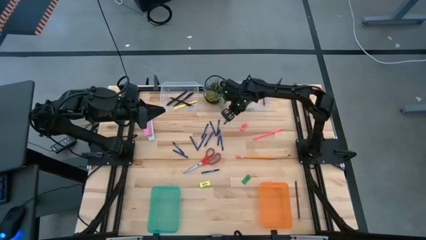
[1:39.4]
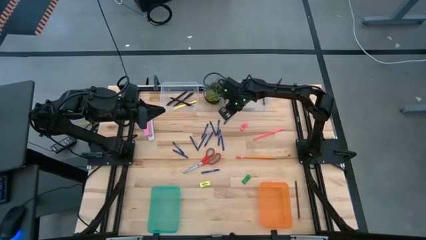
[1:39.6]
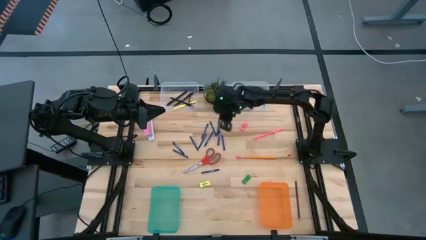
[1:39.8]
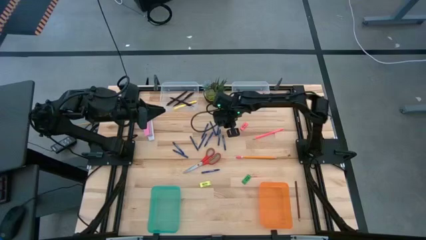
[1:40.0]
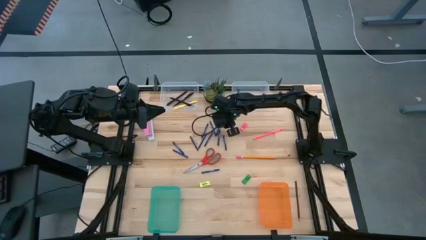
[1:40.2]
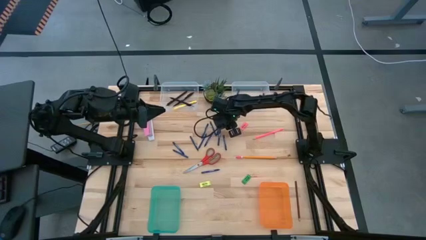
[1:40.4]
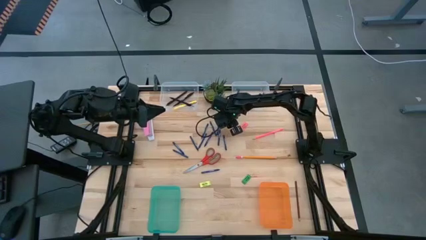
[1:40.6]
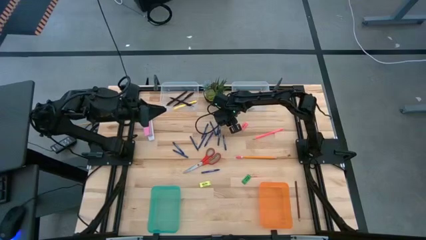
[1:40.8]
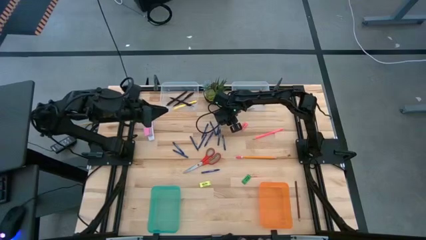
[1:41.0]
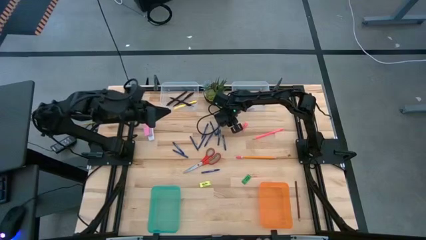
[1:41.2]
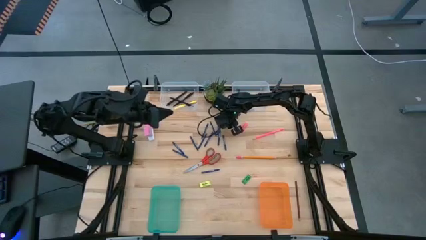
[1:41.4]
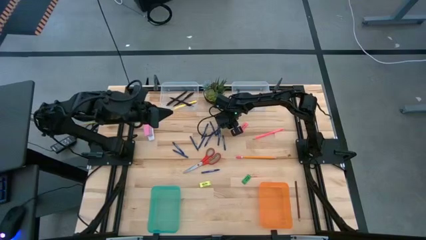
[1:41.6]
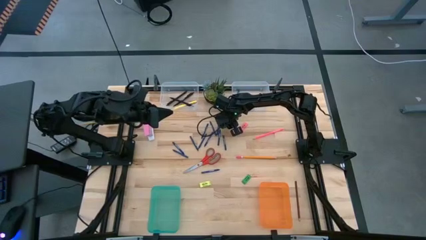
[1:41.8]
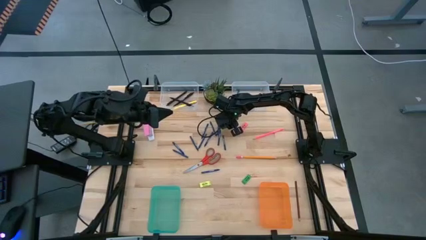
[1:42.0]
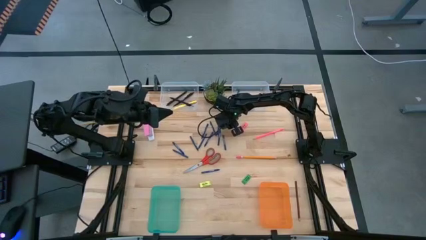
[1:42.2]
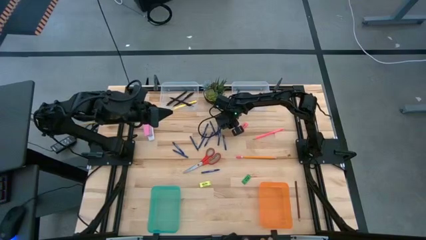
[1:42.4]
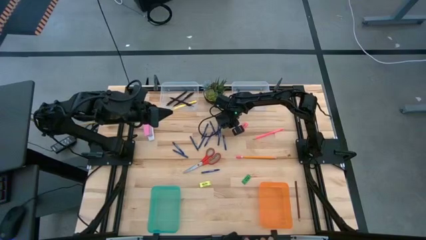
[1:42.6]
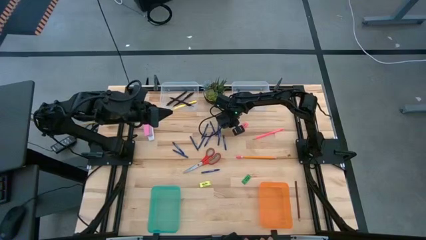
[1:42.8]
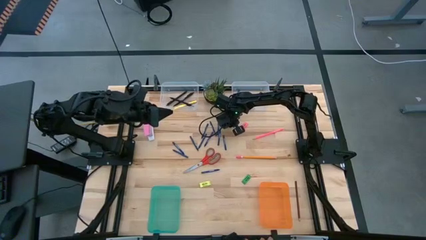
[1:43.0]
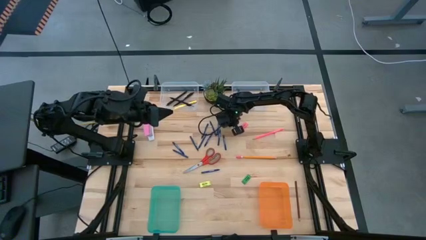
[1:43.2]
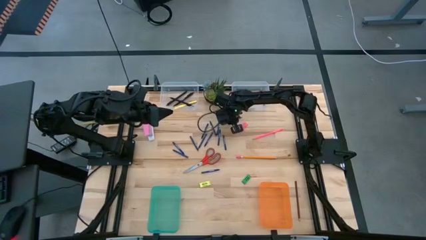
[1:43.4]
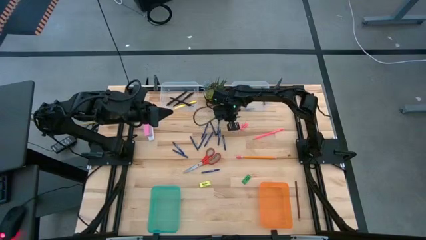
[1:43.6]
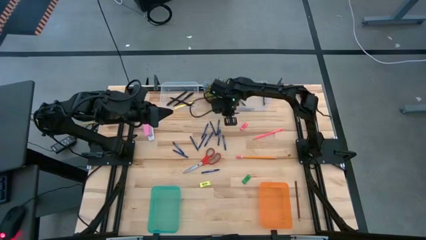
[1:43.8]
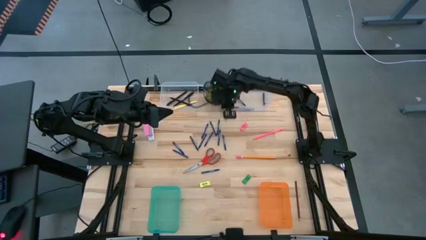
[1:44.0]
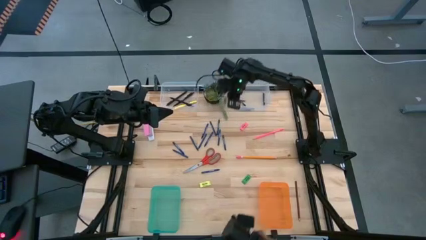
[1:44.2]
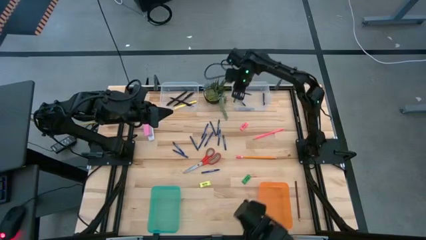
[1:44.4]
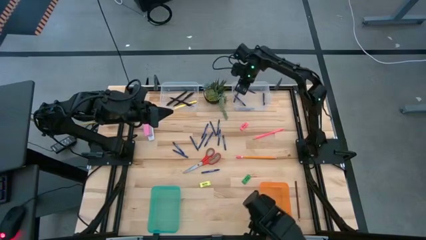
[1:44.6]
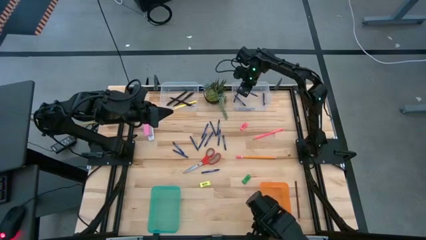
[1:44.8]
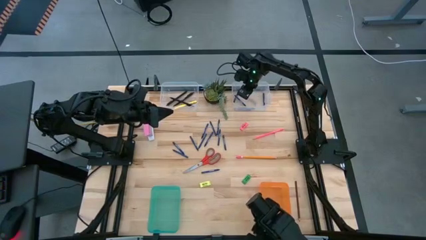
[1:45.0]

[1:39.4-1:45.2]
Task: Sort crayons/erasers/pens/pencils in bins
Put the blue crayon into the right transparent bin

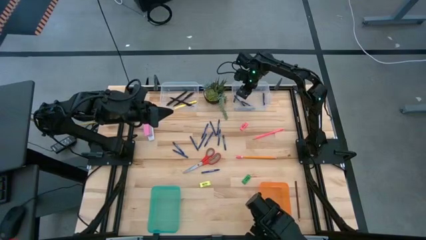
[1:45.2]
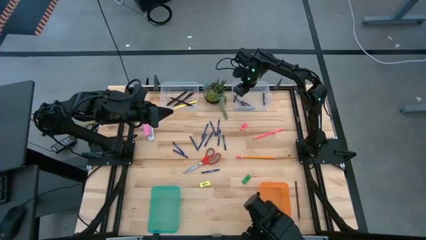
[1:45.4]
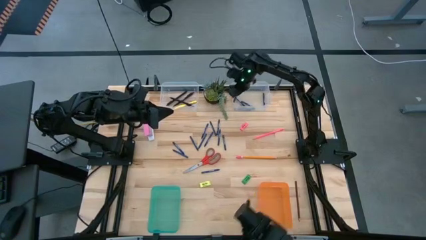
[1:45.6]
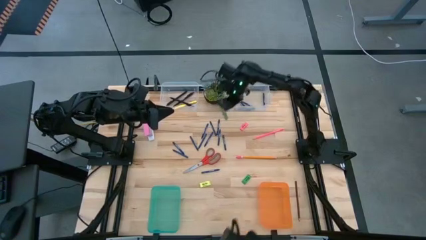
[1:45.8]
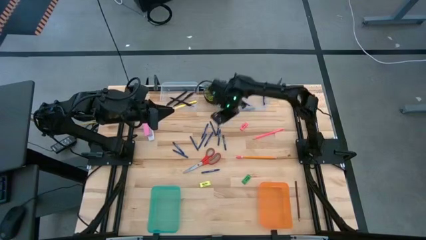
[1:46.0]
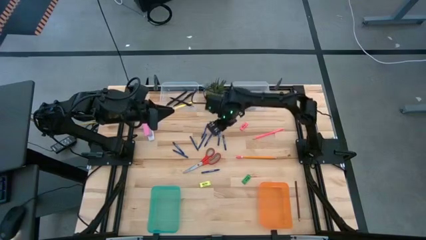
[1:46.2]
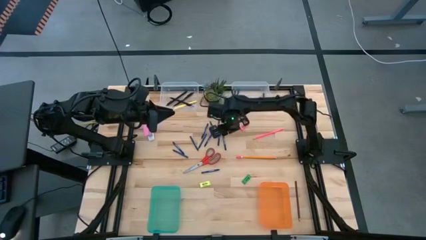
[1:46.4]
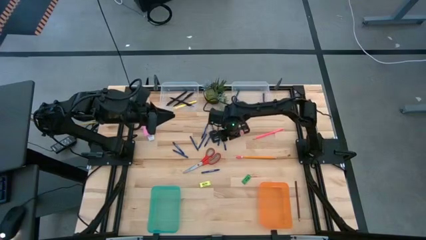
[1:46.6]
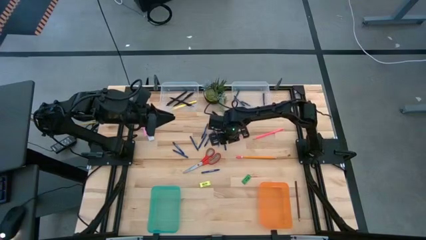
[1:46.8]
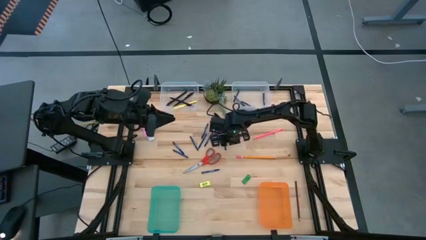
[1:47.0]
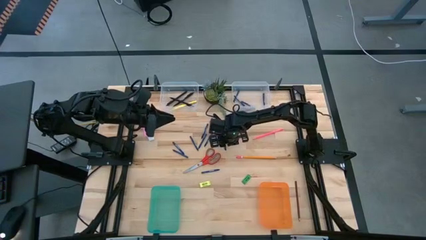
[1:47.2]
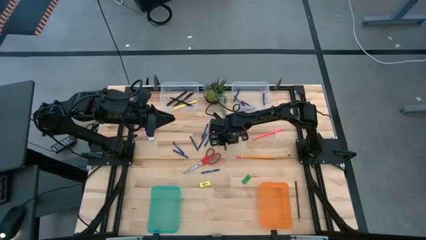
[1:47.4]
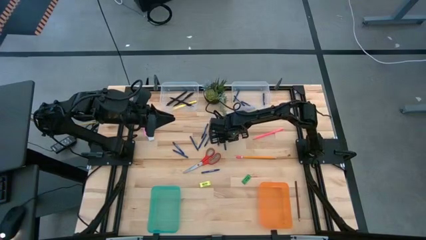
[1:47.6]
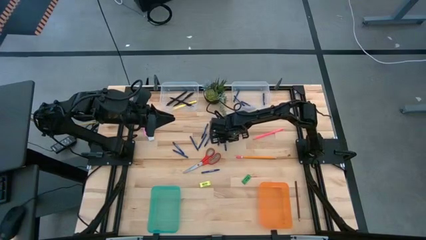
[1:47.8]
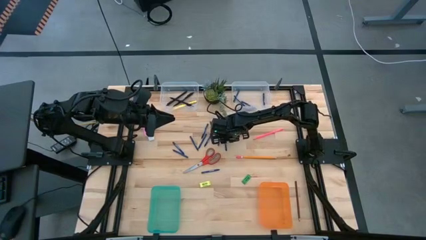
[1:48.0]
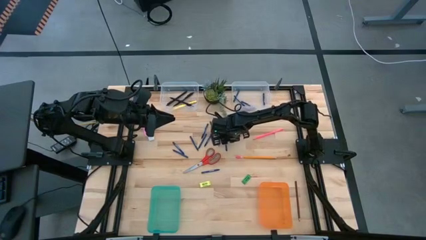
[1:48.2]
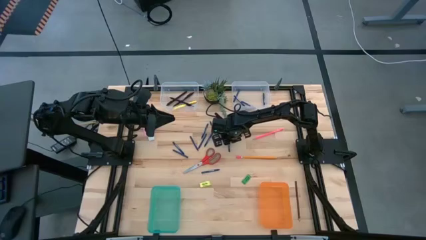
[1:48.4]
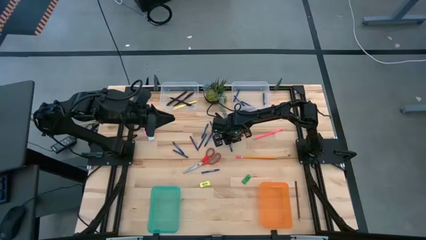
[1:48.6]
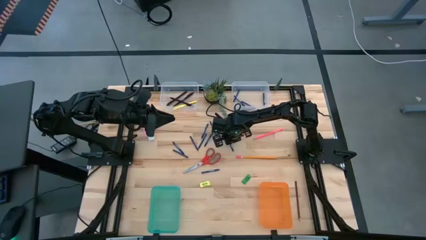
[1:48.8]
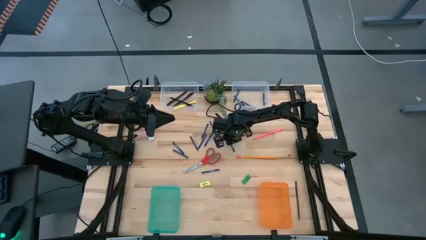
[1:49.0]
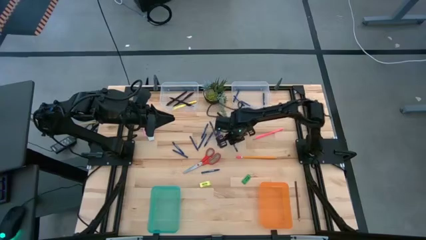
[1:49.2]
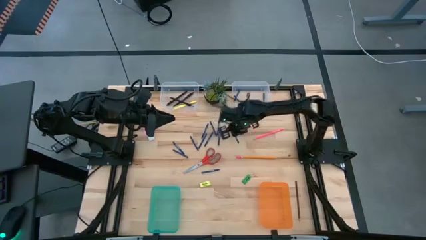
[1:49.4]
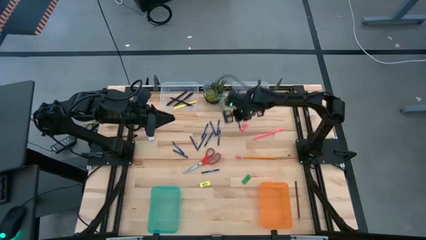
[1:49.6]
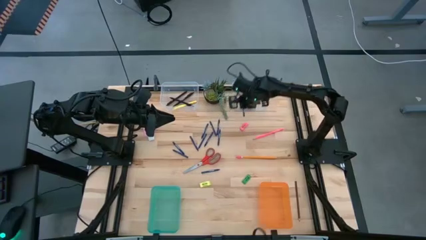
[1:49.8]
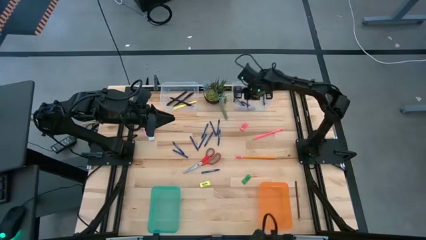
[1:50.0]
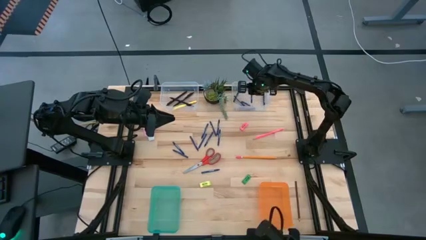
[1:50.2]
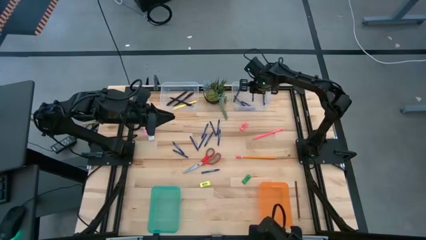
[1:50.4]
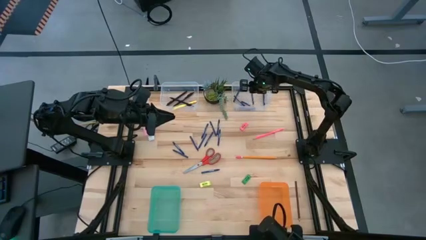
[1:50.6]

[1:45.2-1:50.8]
Put the blue crayon into the right transparent bin

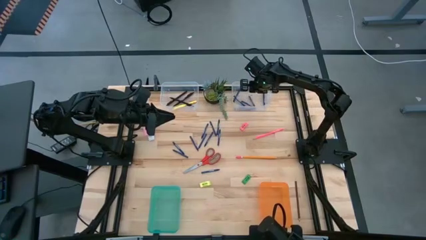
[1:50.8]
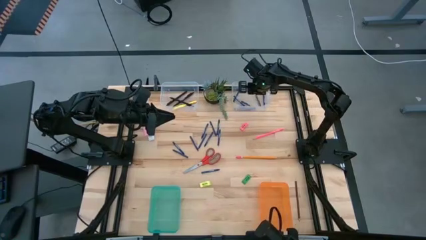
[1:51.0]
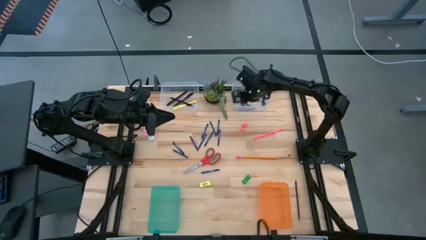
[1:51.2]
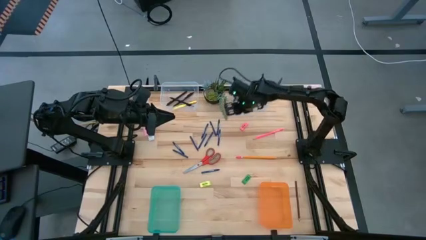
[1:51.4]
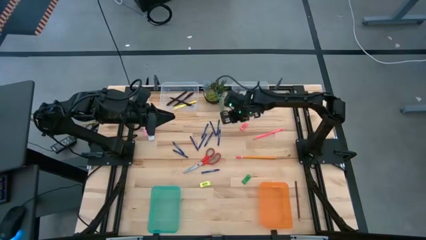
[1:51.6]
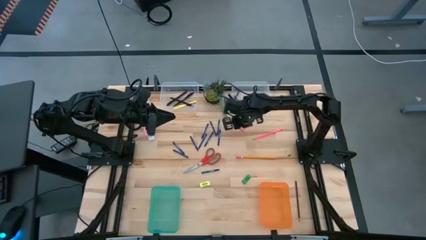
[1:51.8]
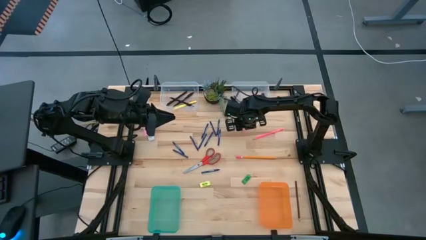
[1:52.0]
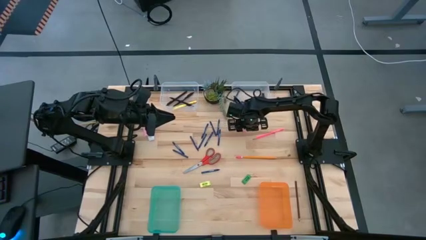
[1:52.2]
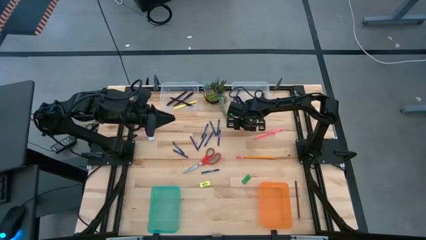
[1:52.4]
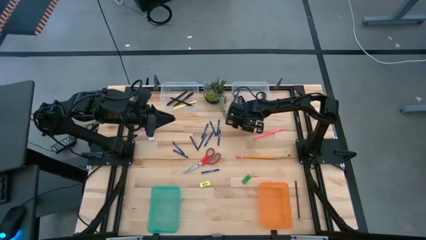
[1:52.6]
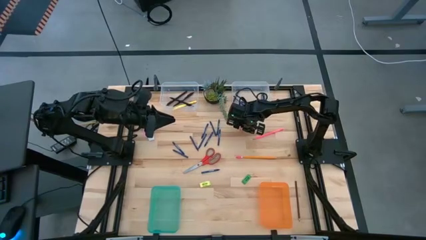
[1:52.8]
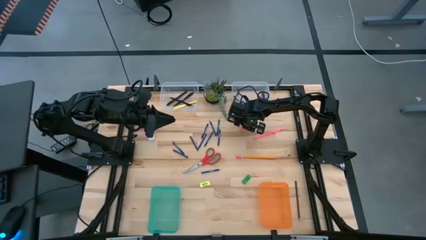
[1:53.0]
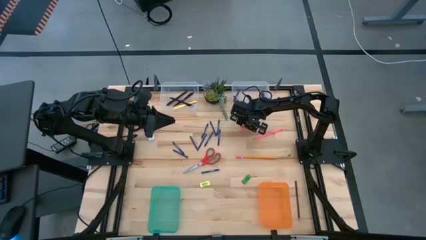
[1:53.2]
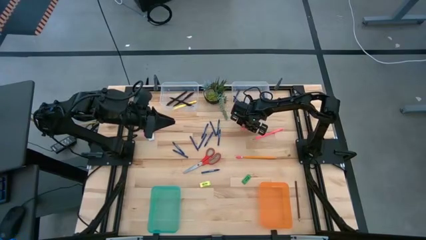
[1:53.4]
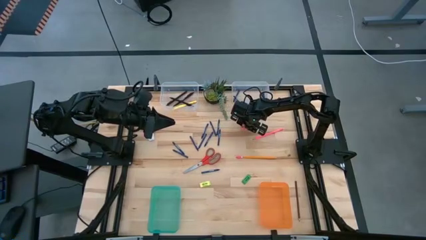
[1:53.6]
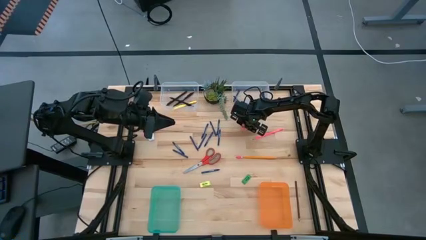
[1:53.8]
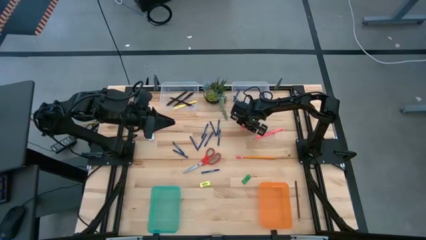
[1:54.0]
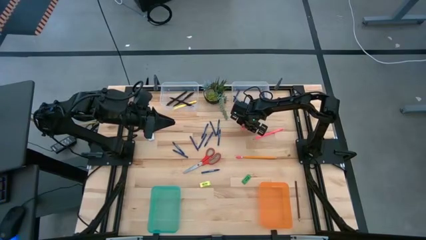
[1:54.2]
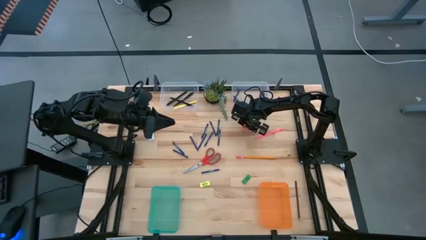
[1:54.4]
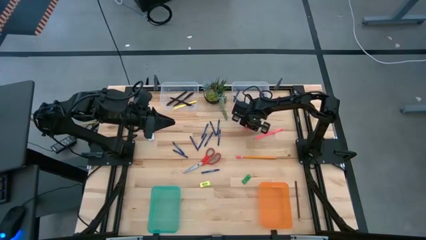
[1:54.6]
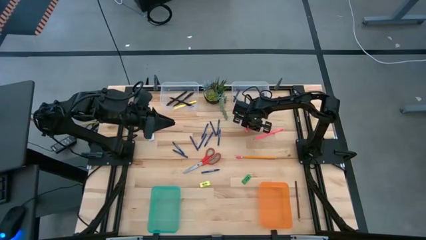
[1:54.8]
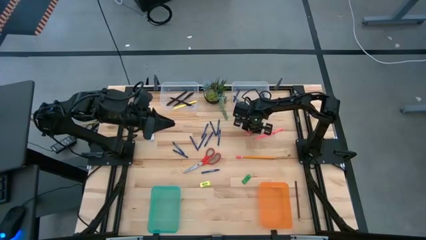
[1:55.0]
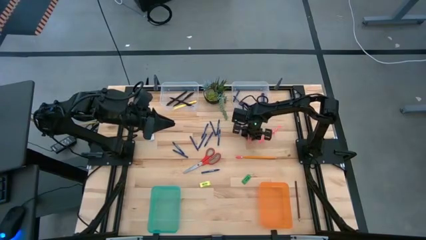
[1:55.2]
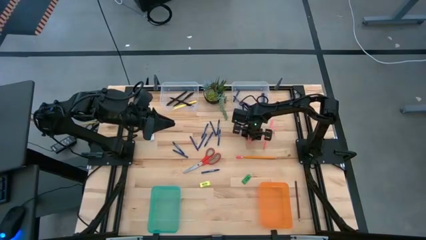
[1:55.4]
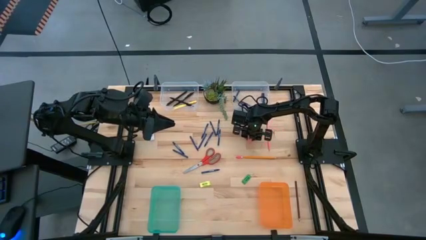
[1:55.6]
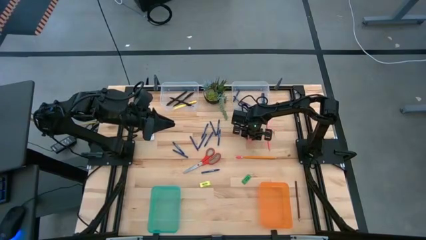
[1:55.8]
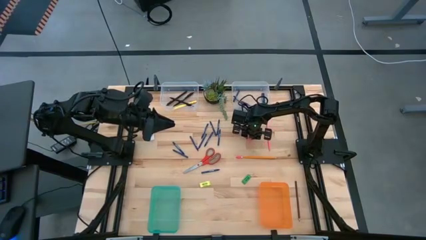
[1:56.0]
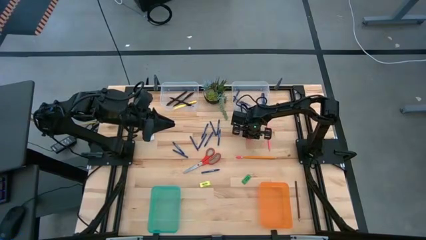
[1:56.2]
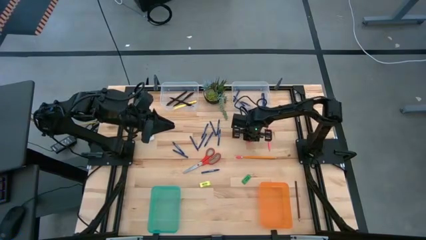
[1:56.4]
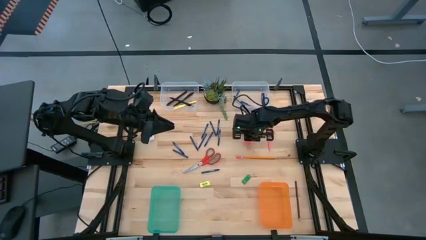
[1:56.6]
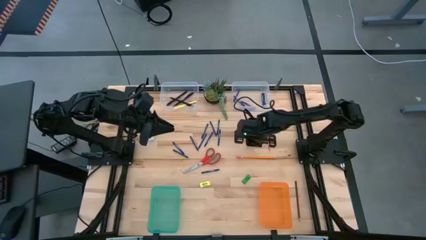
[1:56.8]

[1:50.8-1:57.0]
Put the pink eraser into the orange bin
